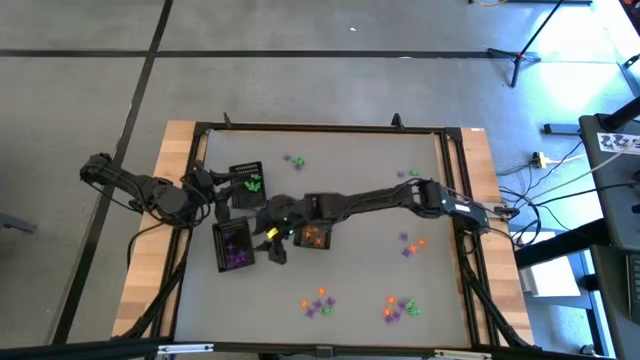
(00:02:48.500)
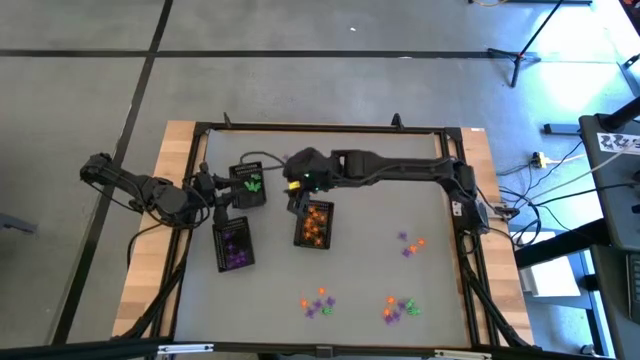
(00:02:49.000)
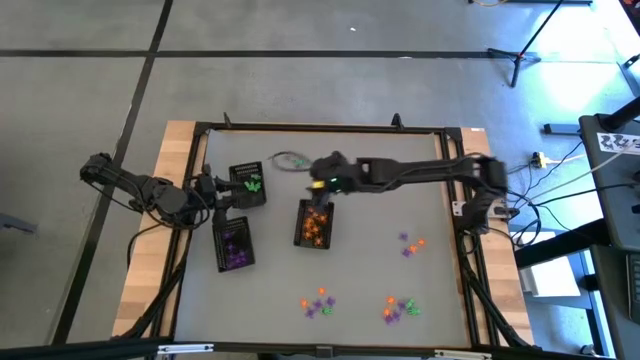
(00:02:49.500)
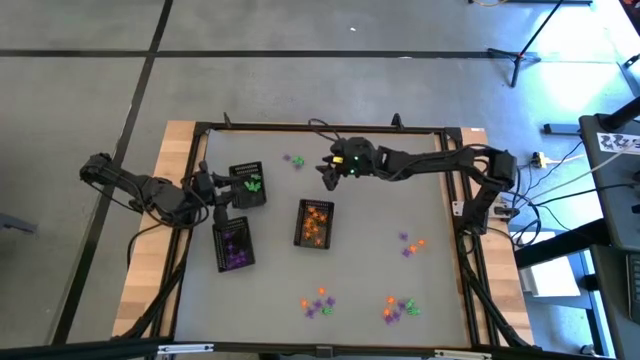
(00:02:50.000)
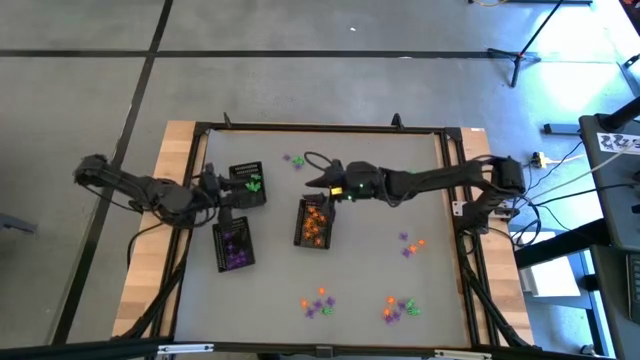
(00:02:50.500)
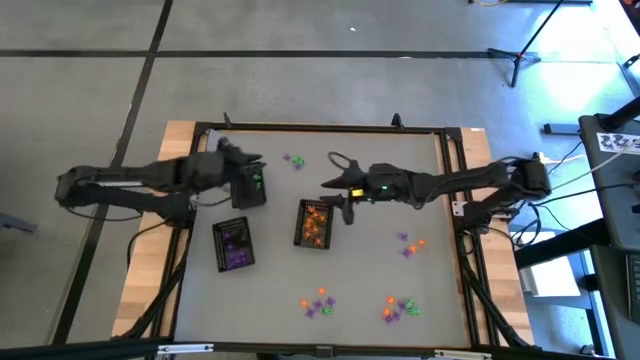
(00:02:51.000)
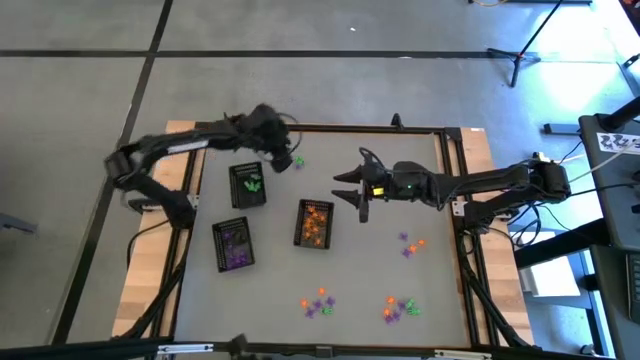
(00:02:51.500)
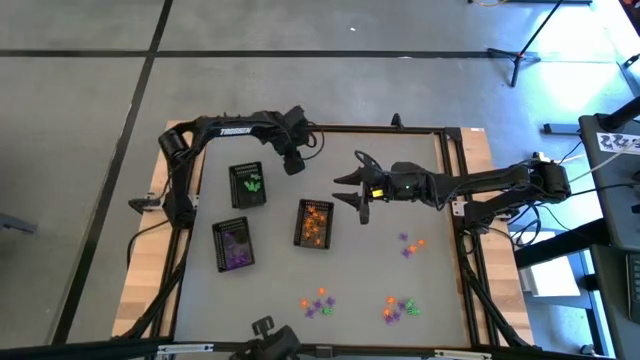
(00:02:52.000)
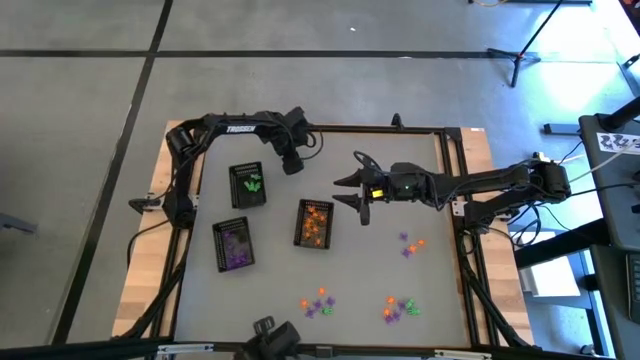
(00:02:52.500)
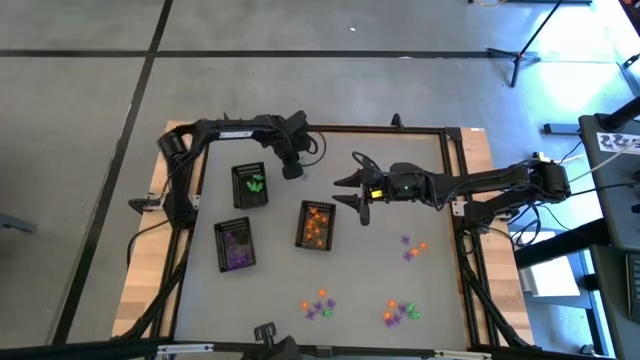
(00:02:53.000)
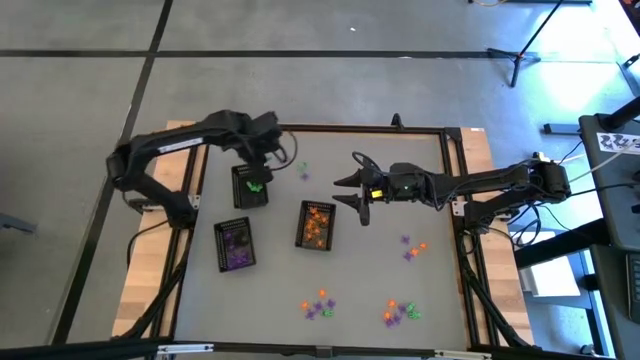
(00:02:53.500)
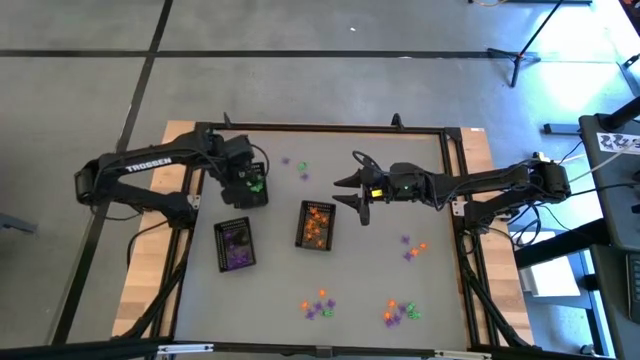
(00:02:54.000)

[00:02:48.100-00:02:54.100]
Task: Sort Halloween decoration
Put the green alien toy into the top left black basket

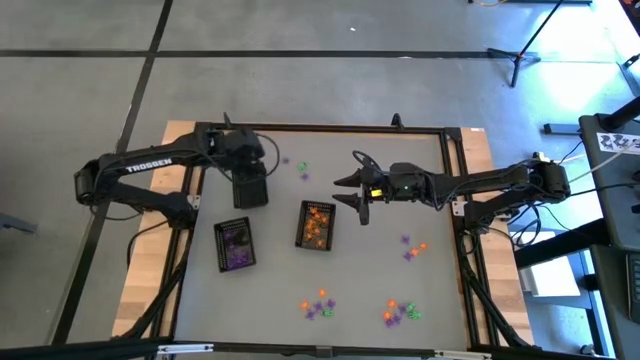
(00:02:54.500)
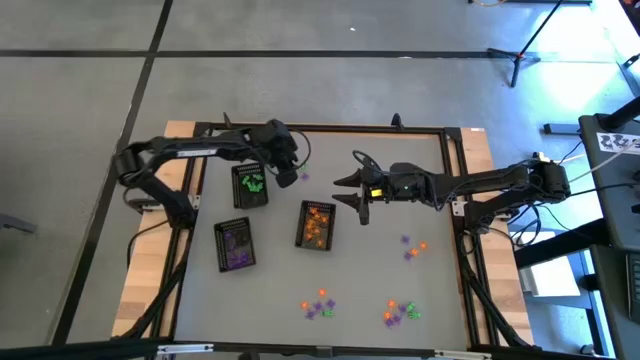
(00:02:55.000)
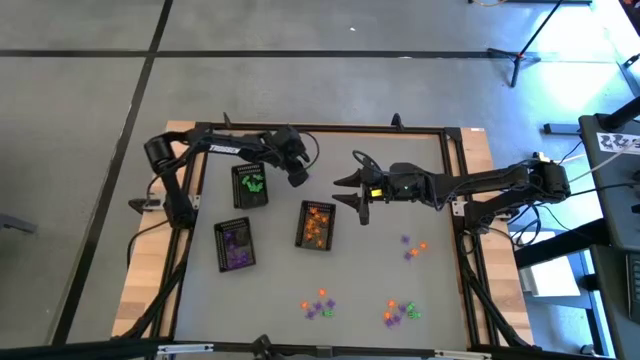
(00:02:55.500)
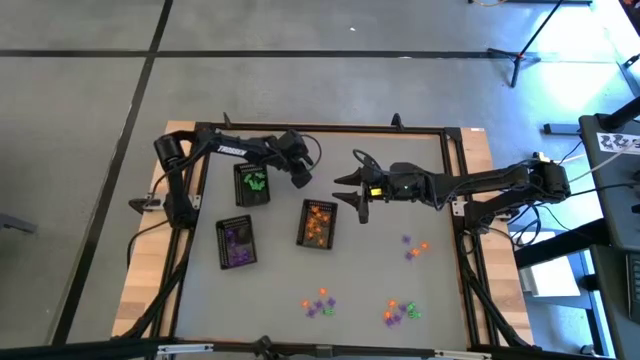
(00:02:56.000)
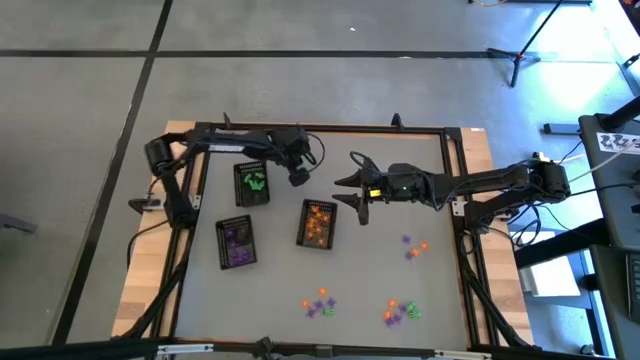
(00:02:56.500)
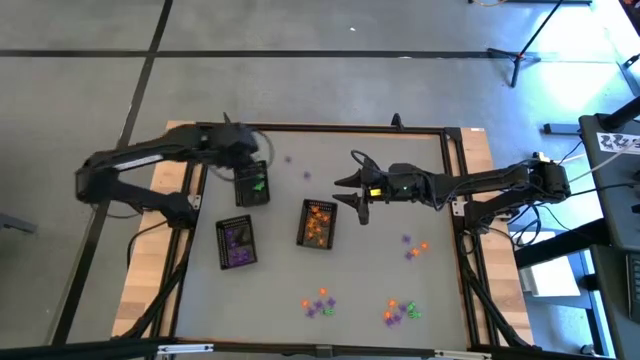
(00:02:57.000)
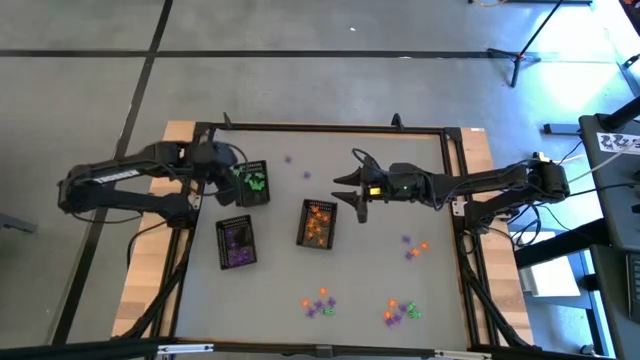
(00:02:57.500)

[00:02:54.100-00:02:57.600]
Put the green alien toy into the top left black basket

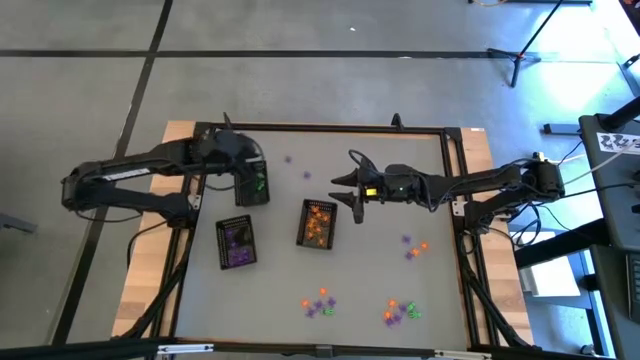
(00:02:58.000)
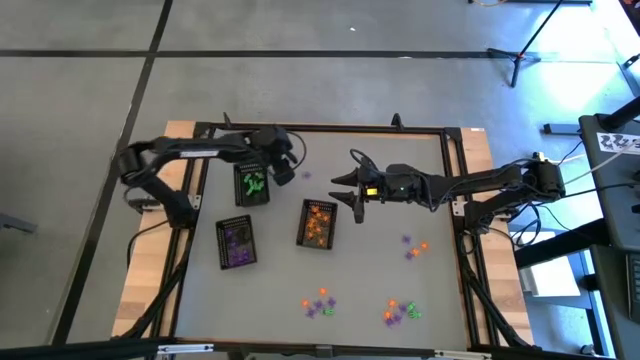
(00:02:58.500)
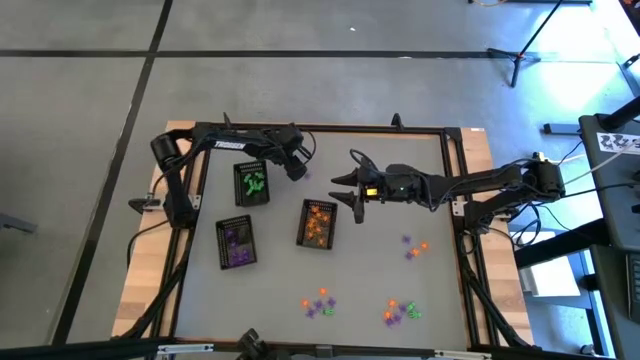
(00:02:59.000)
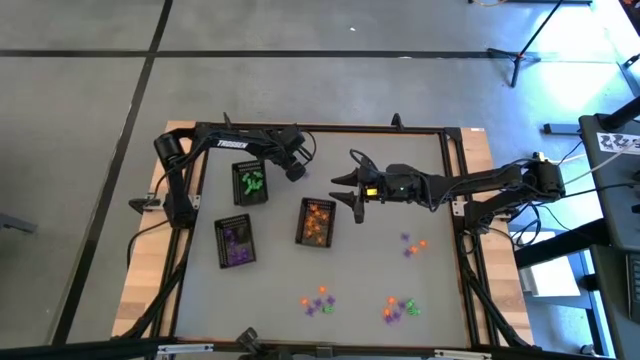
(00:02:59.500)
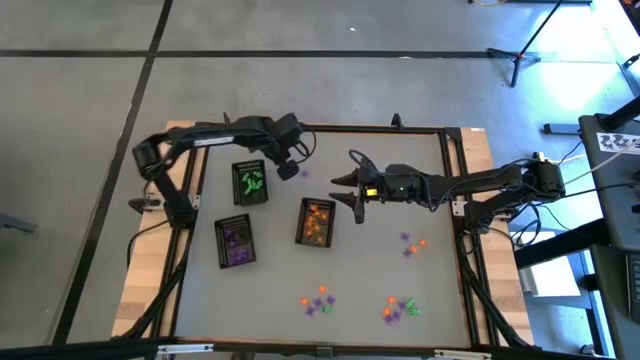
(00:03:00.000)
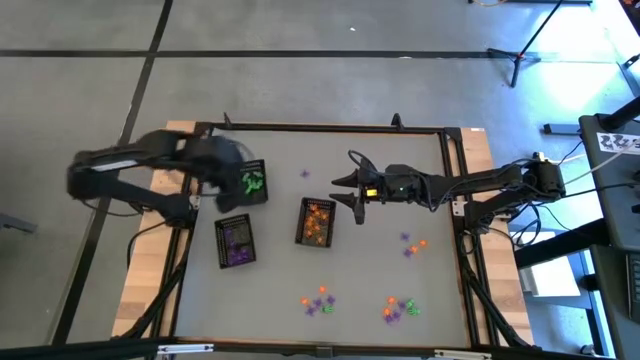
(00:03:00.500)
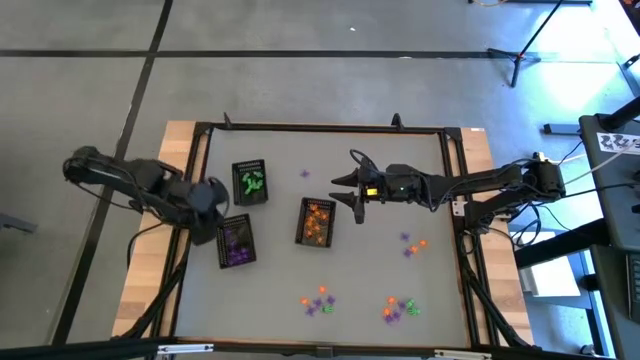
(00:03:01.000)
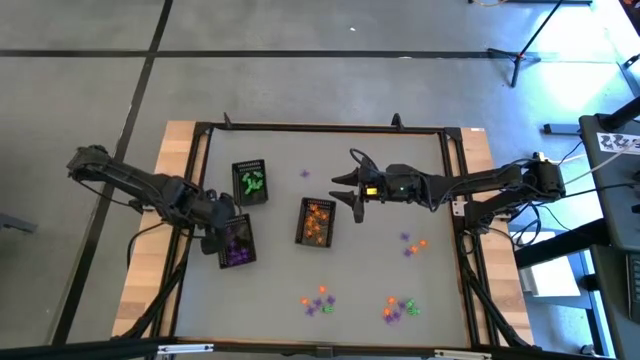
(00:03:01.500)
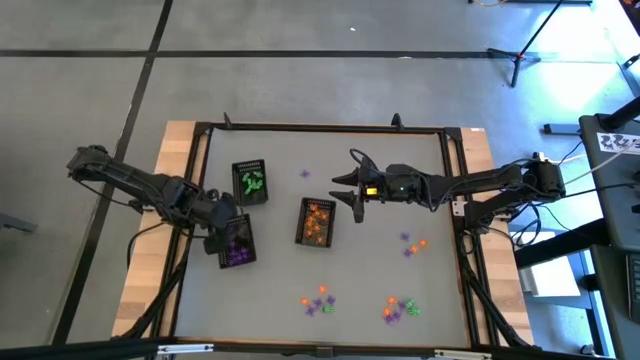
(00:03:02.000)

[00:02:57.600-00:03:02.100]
Put the purple spider toy into the bottom left black basket

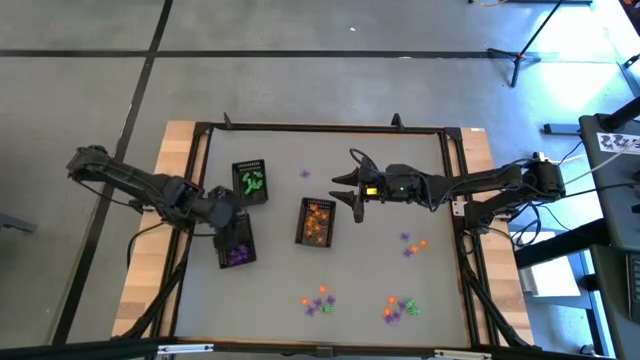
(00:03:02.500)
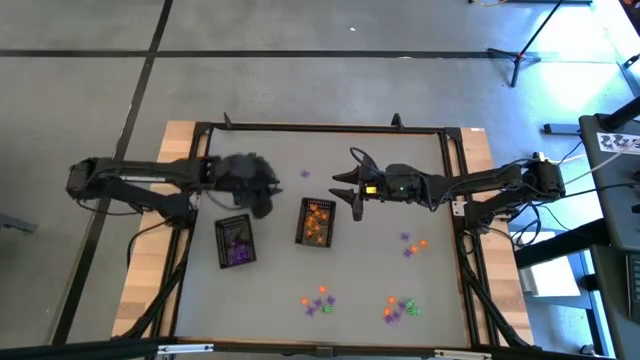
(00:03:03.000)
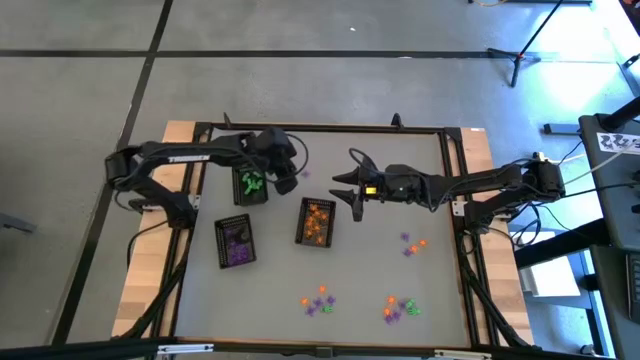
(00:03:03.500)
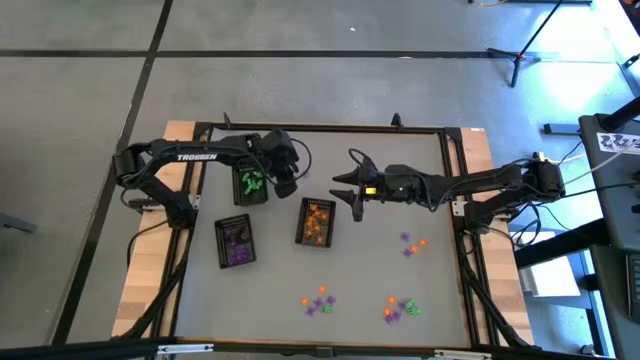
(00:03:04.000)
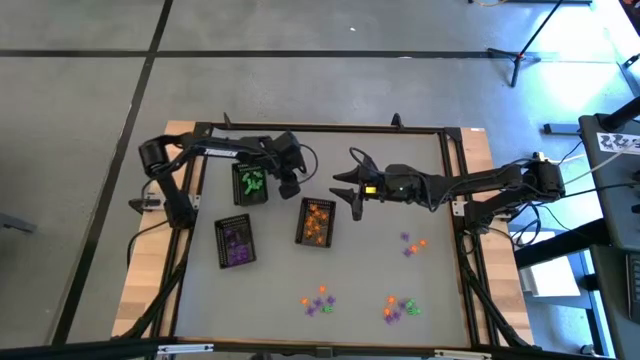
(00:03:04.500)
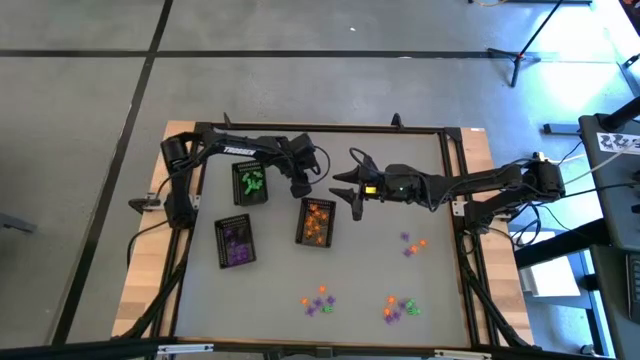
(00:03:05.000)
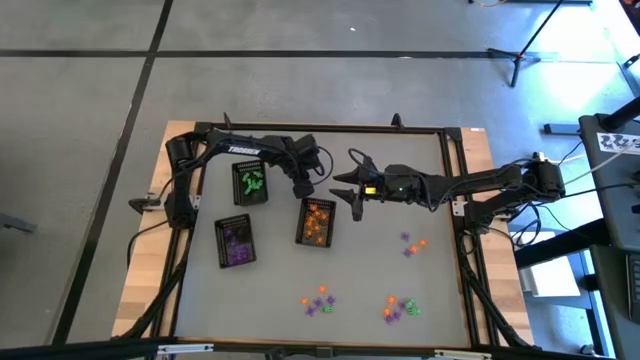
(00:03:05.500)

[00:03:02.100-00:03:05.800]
Put the purple spider toy into the bottom left black basket

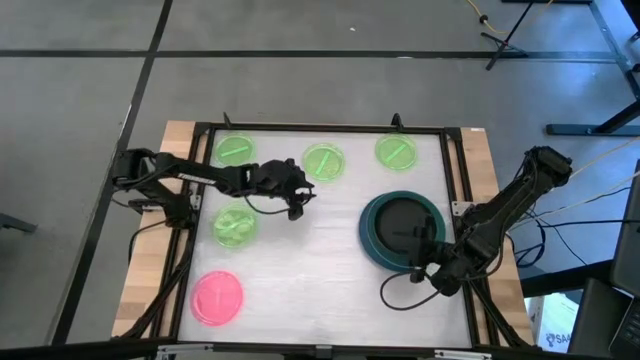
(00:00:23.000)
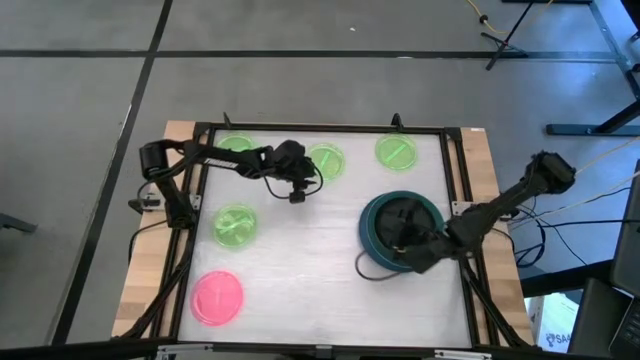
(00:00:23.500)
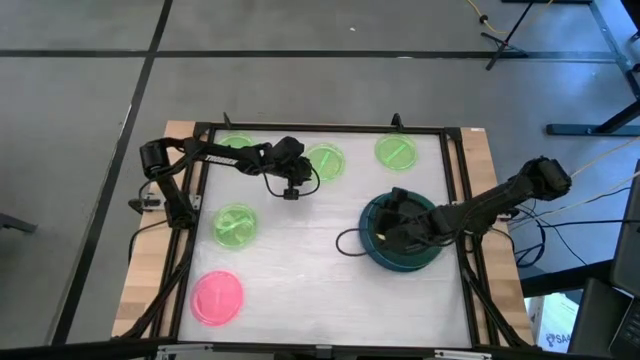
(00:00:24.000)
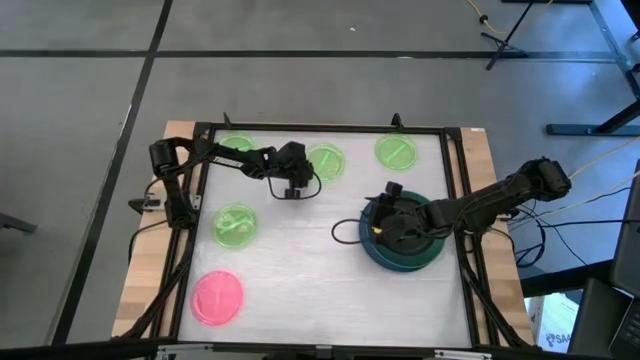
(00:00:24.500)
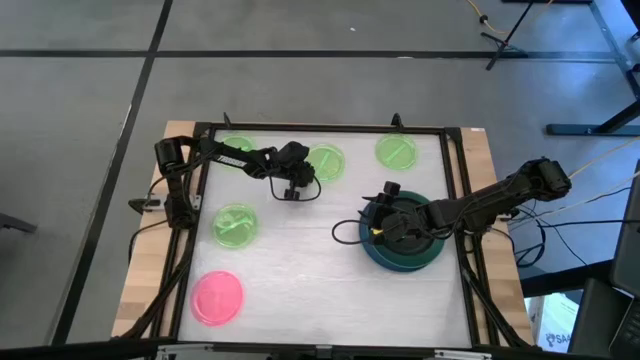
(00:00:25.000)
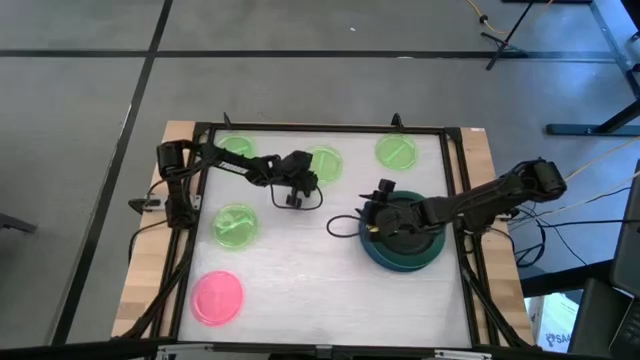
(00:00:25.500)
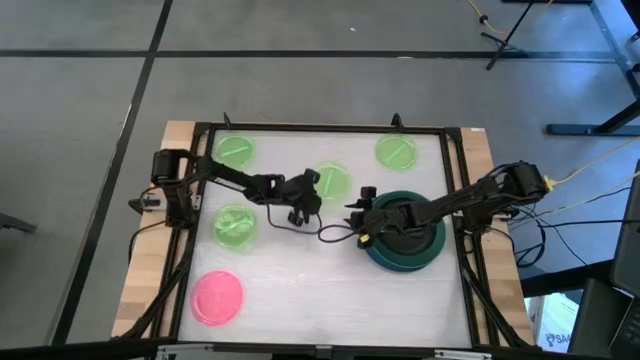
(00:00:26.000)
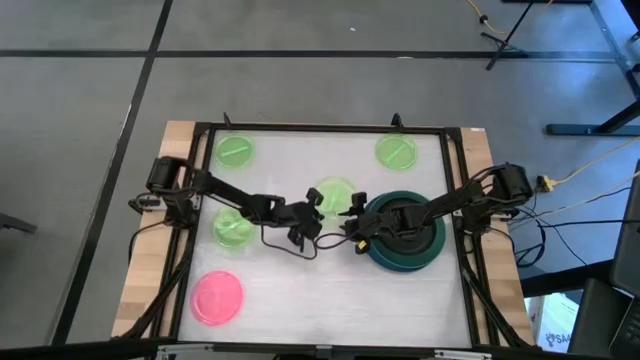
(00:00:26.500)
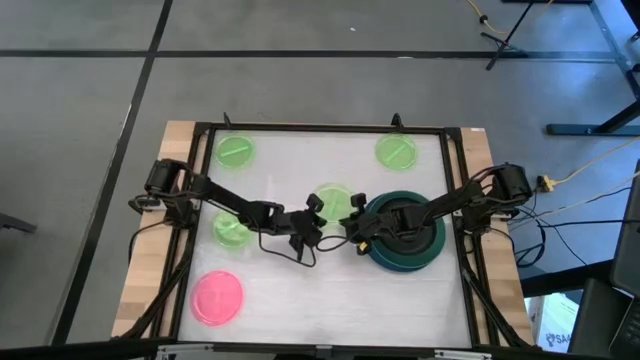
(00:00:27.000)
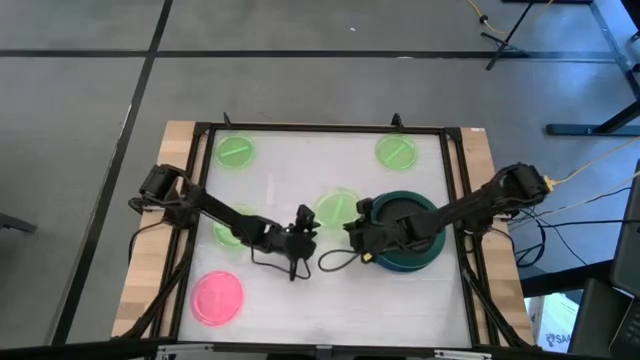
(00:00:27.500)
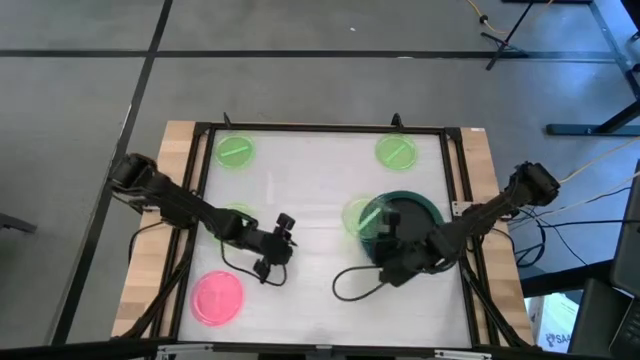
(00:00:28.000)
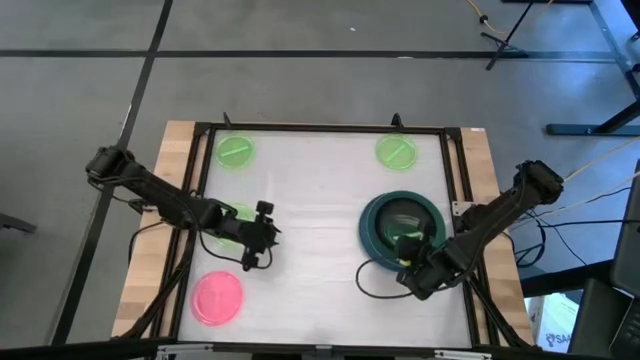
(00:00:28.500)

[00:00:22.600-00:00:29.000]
Task: Stack plastic plates
Stack the top middle transparent green plate into the black plate
